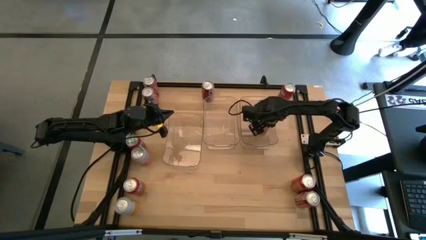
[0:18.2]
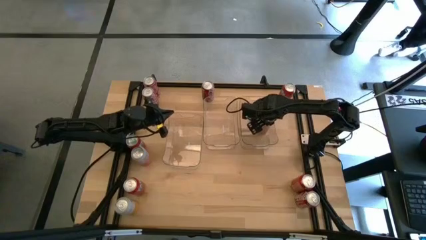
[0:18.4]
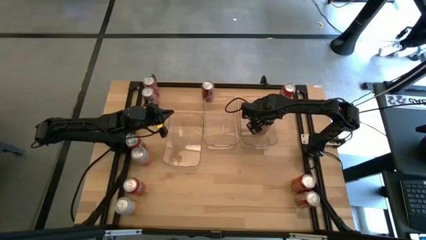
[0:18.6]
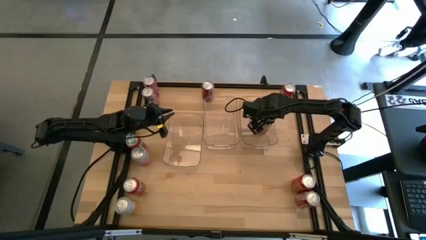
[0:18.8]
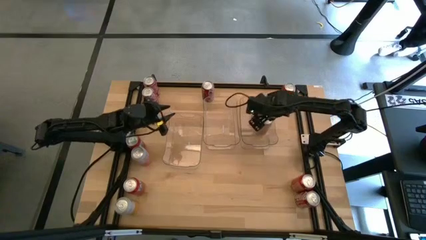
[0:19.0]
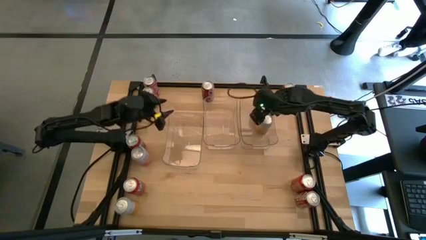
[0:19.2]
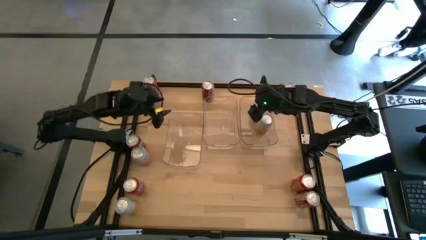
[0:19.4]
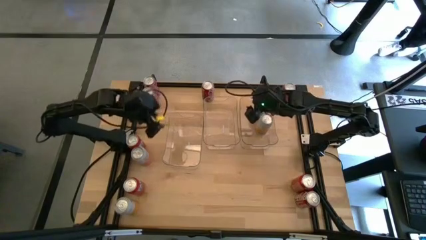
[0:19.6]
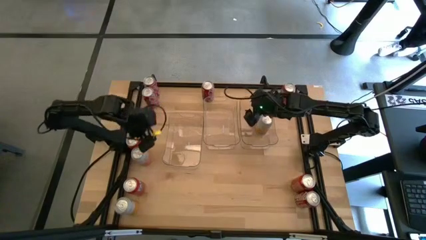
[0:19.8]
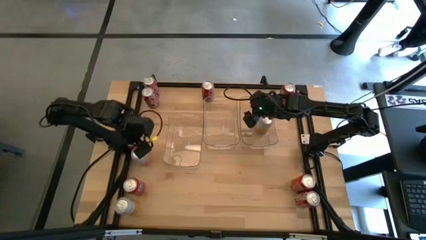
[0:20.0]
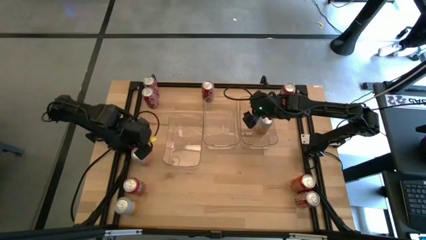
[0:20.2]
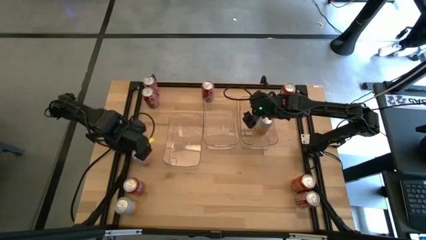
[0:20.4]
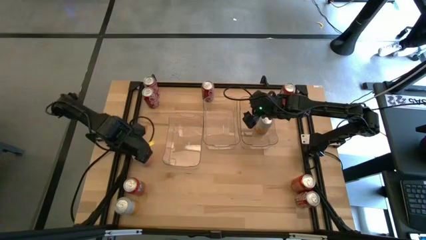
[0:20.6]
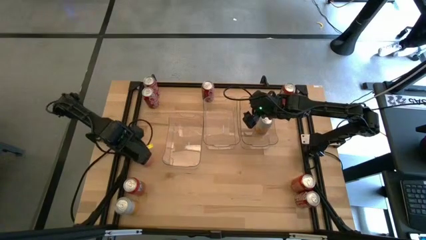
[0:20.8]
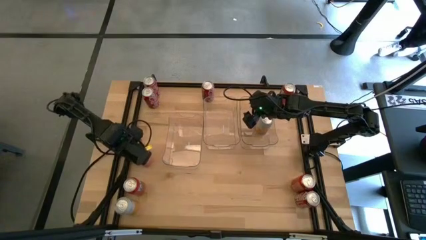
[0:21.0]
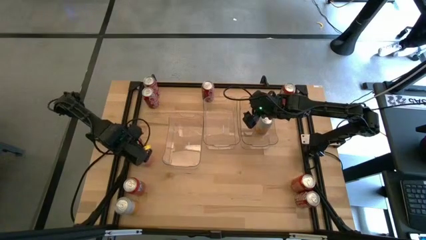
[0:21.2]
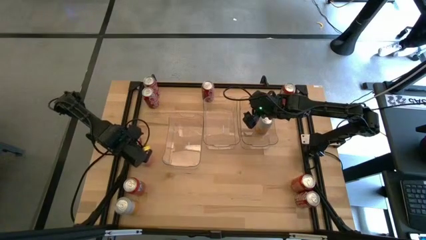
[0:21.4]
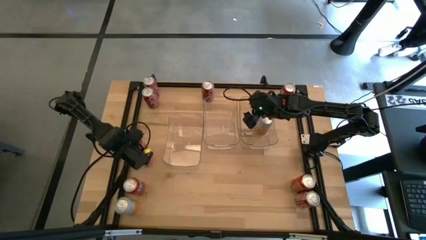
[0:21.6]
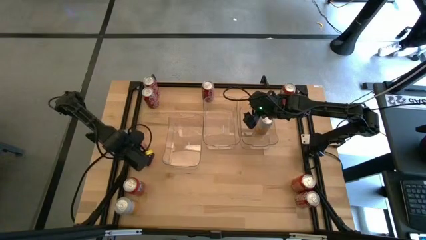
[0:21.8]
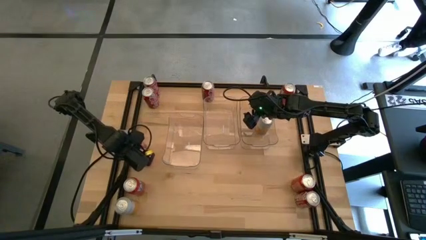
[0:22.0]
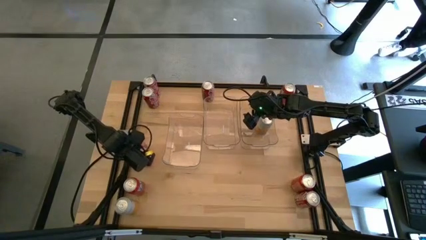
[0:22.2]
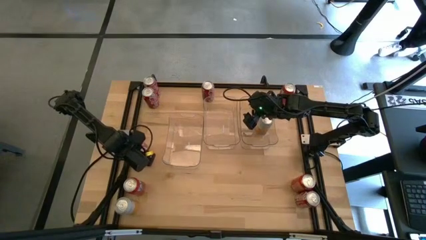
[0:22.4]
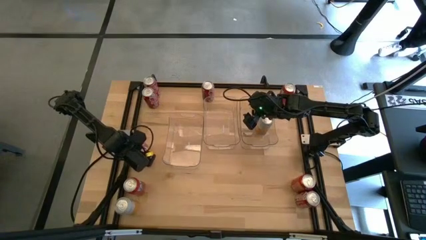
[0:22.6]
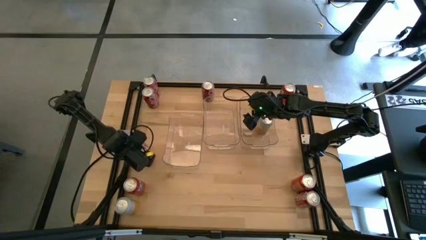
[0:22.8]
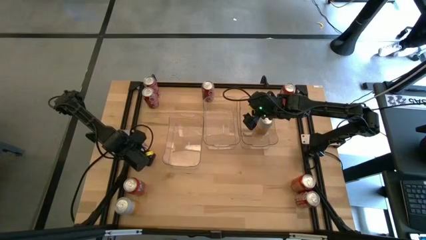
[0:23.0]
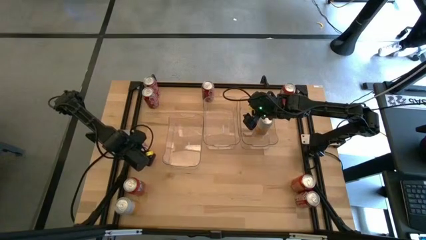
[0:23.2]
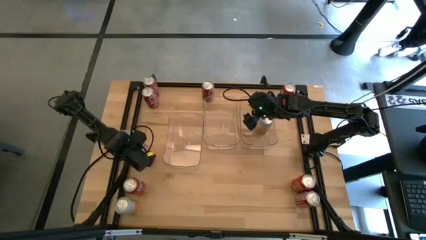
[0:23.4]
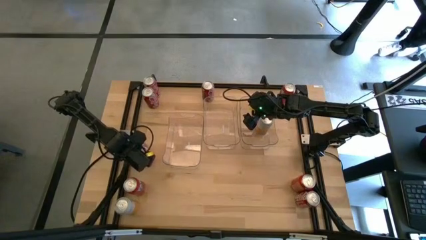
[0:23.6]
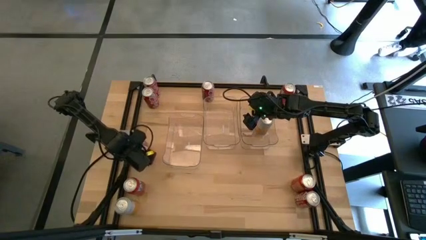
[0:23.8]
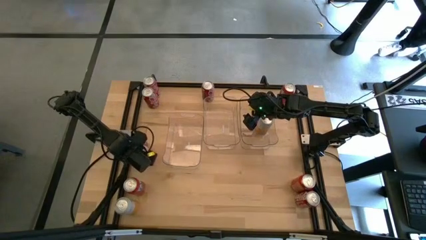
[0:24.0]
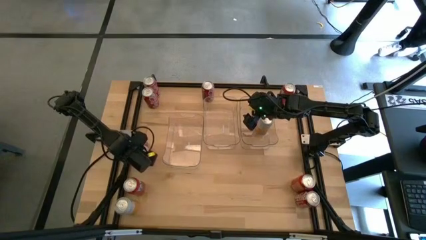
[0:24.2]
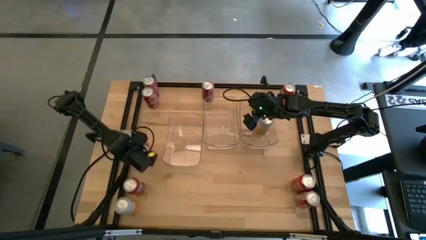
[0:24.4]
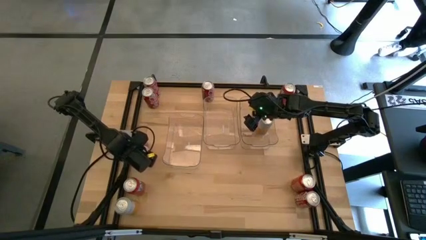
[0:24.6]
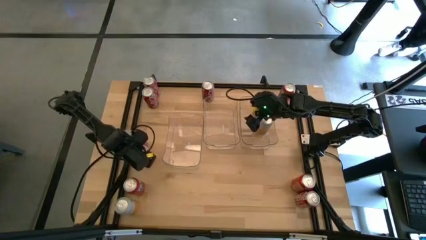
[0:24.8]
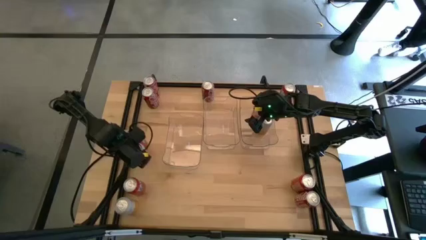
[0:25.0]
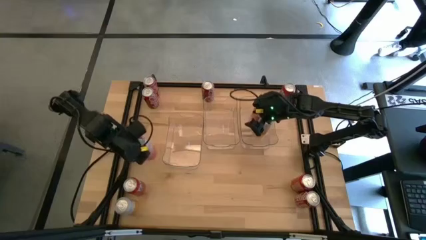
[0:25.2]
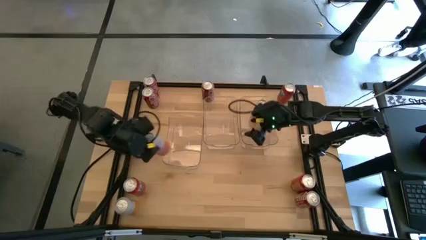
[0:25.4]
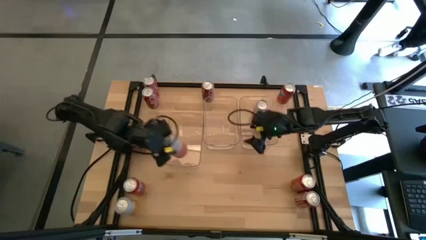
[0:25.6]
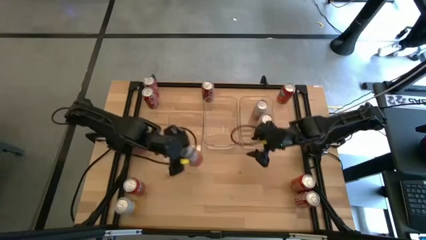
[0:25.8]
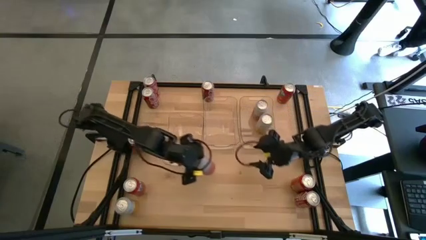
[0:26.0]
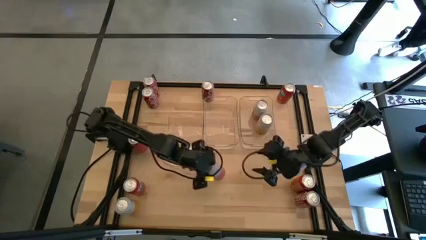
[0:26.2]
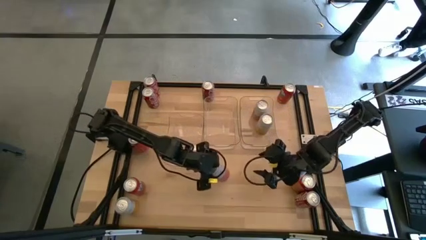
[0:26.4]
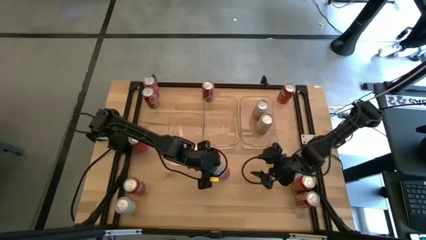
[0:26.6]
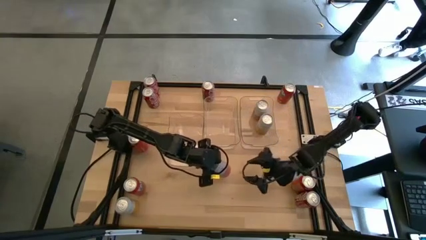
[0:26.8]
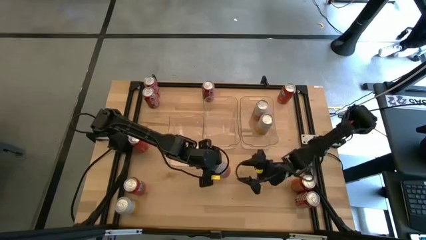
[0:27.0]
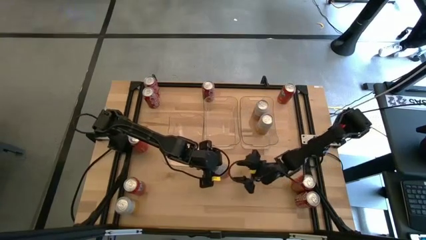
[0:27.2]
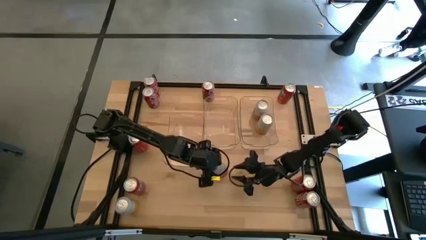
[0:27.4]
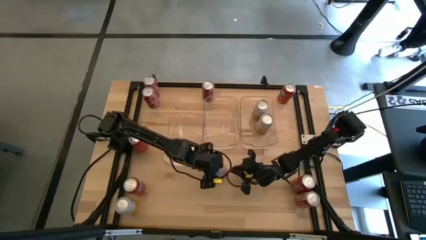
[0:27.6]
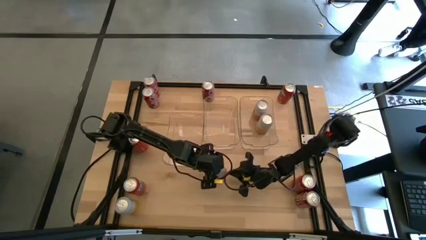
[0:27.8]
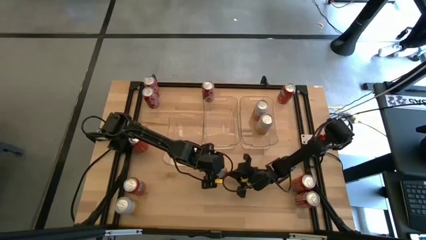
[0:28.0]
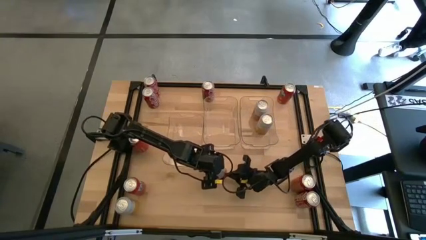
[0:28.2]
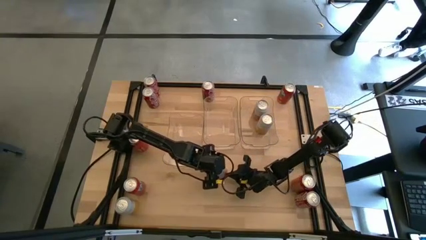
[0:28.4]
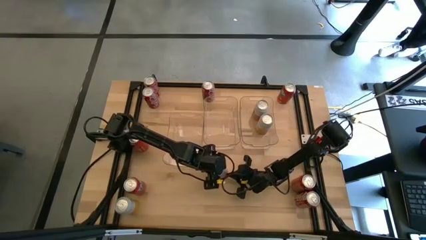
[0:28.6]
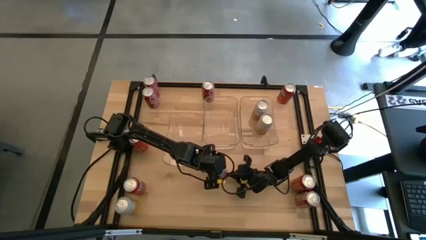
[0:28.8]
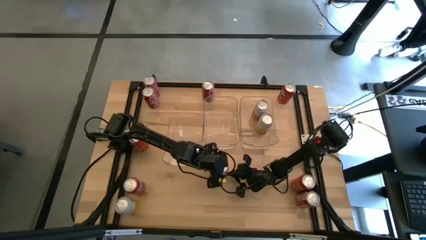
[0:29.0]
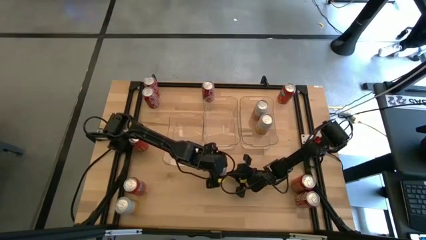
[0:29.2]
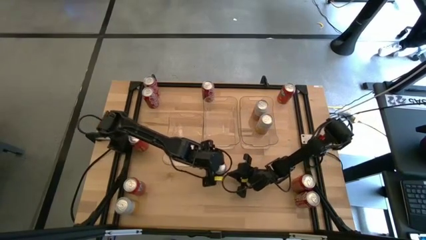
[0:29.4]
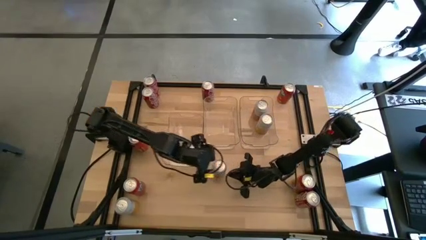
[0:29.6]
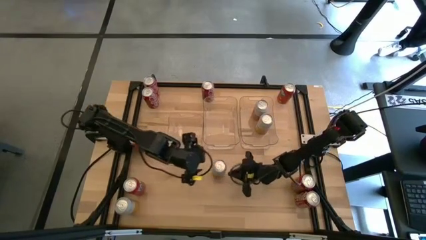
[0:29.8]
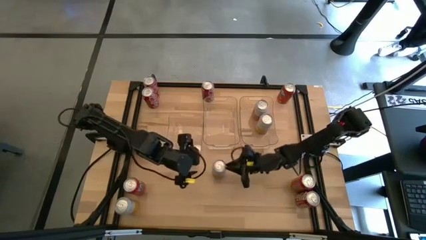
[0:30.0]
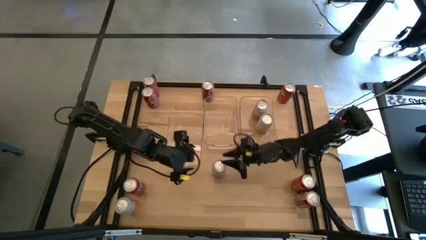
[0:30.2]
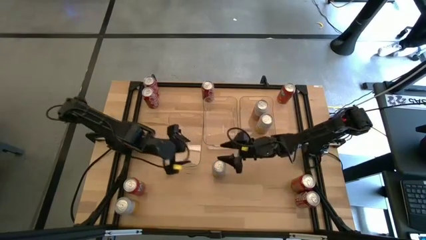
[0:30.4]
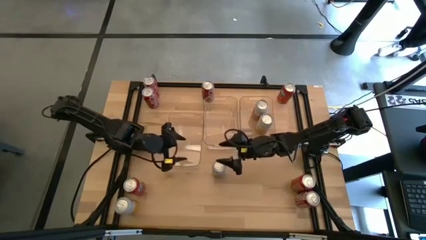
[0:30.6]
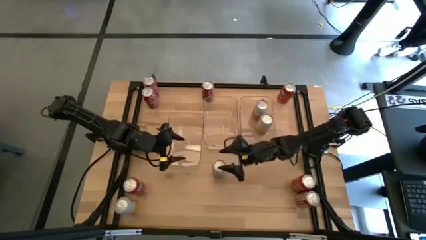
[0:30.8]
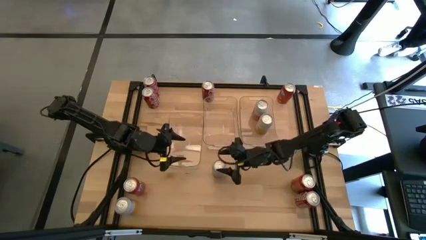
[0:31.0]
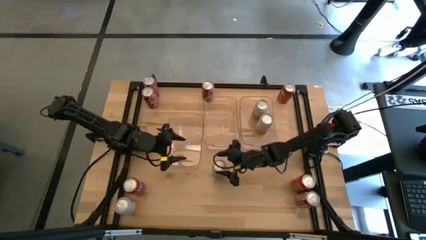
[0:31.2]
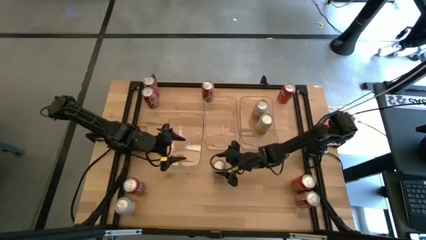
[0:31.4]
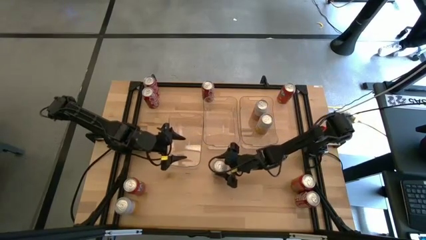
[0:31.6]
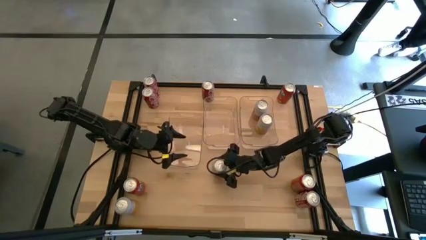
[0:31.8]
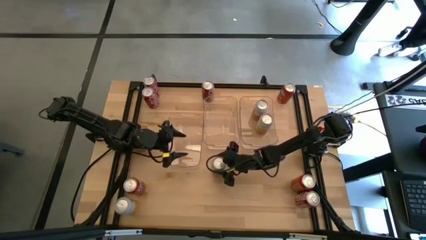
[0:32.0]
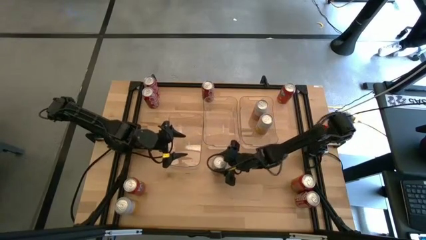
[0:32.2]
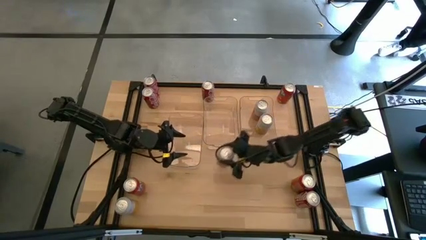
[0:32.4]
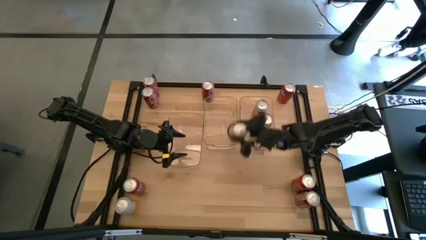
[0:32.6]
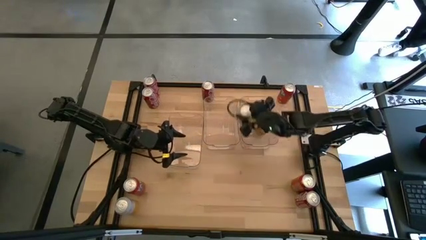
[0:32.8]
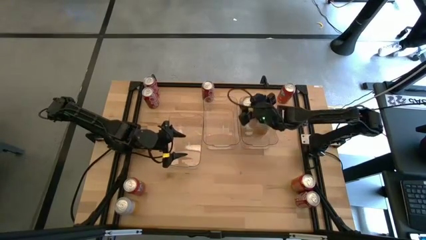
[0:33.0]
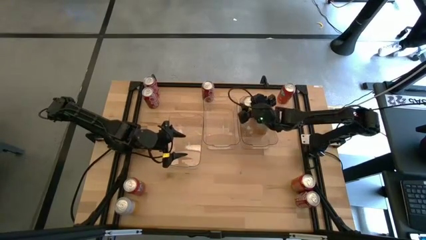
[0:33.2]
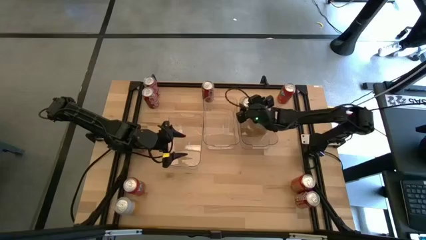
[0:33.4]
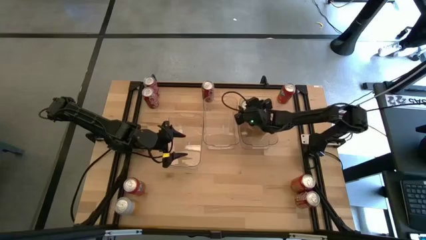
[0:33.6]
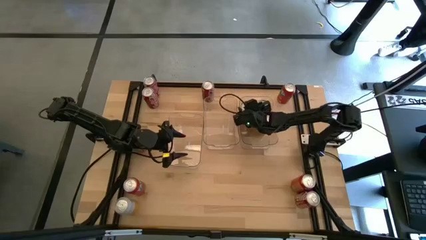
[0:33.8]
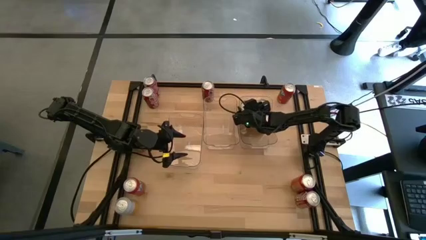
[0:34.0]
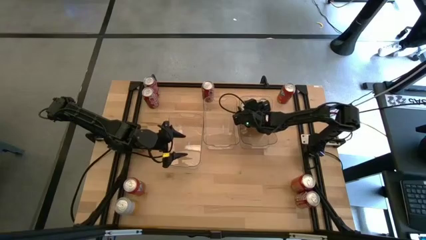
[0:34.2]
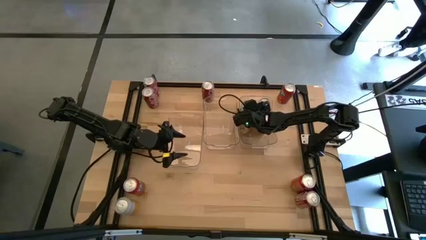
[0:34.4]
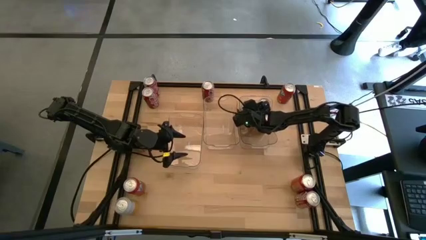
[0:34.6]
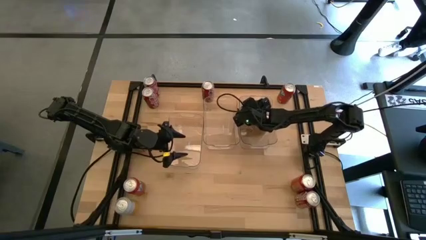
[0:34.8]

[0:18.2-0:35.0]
Task: Sort soda cans
Put the top white soda can into the right transparent bin
